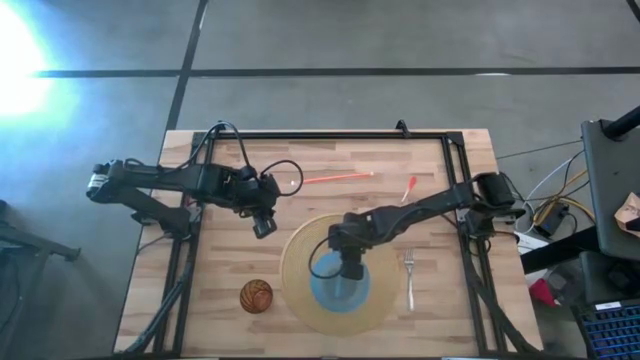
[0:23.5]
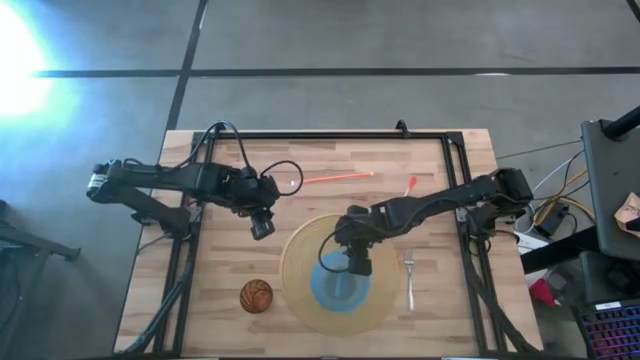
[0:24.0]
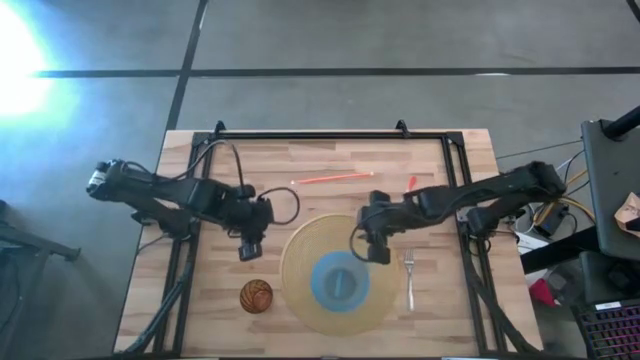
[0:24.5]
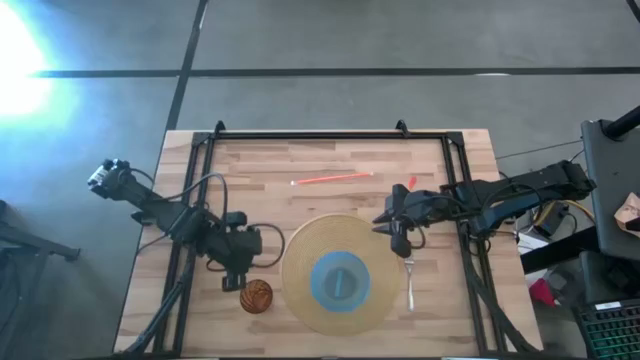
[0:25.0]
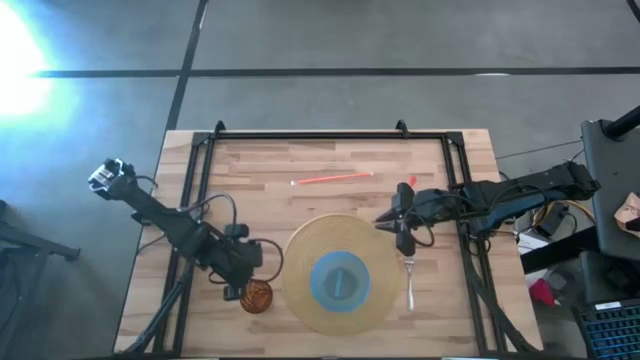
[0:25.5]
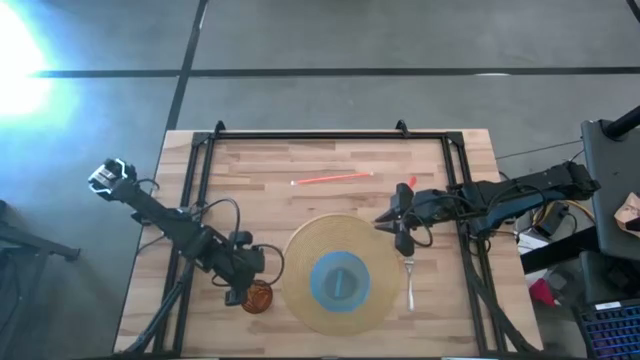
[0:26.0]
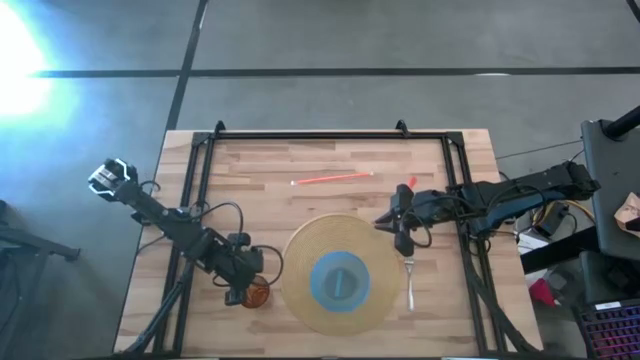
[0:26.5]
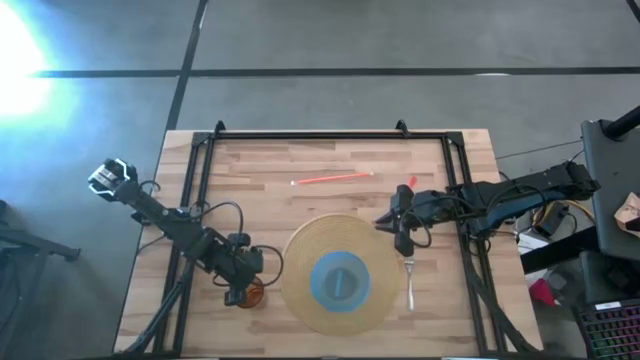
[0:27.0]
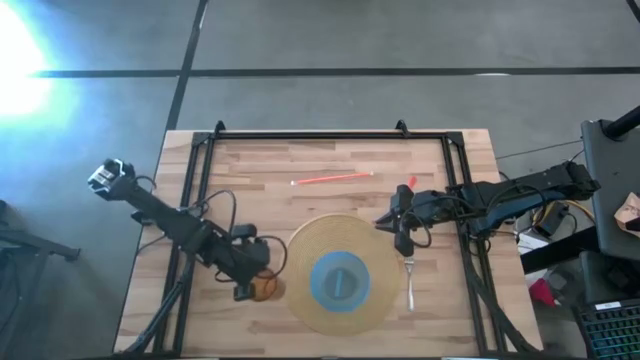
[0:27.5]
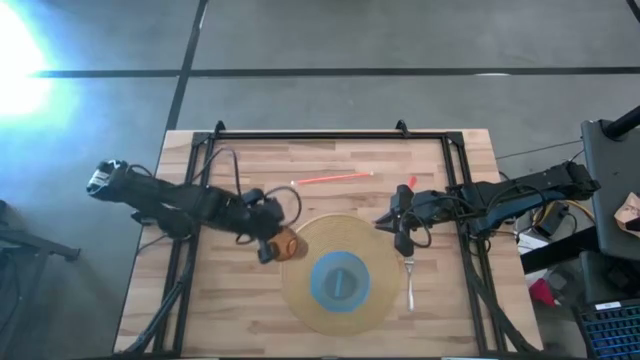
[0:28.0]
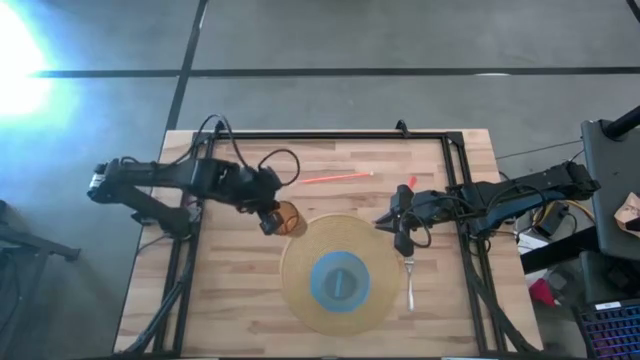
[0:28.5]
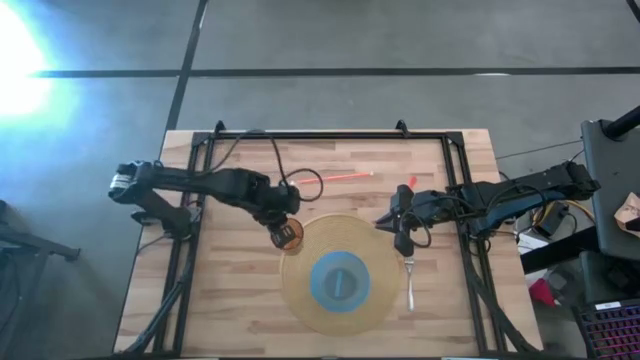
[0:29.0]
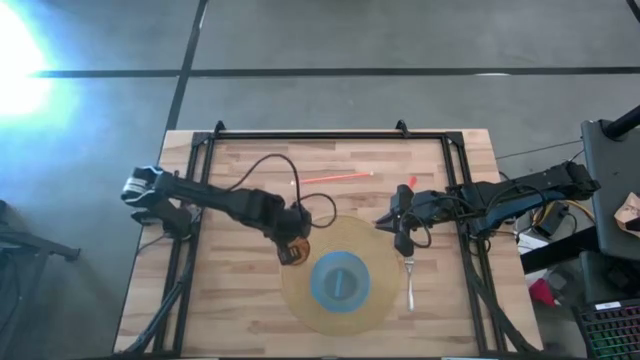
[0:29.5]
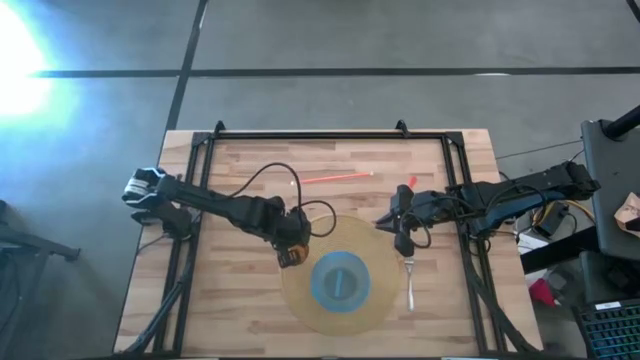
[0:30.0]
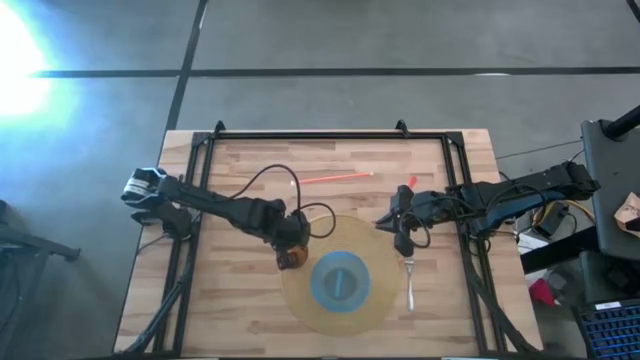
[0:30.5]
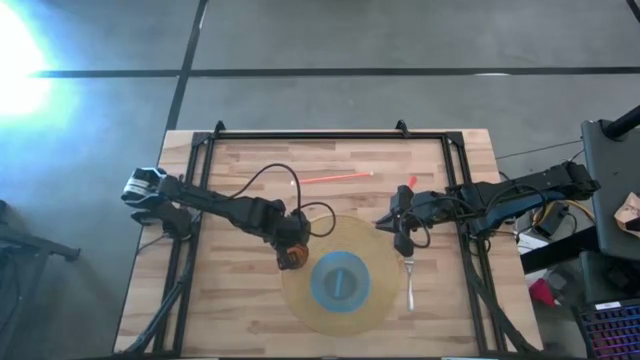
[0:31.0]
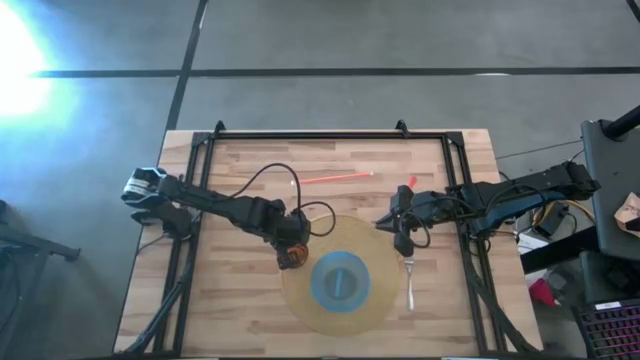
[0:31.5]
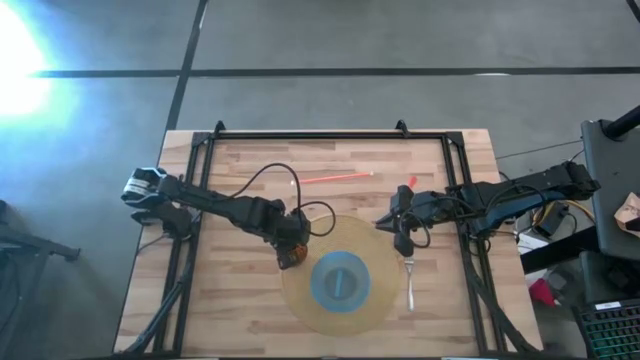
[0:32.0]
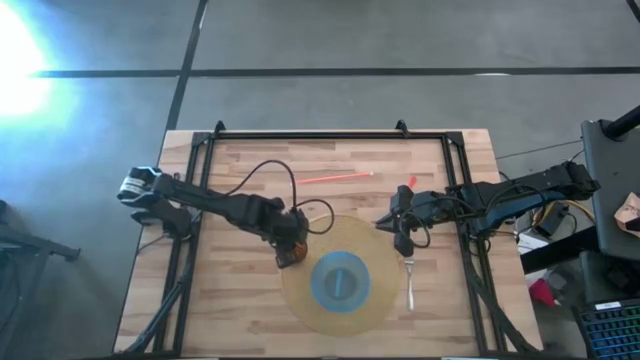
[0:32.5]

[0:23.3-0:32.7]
Task: Pick & Place Utensil
Put the cup on the mat

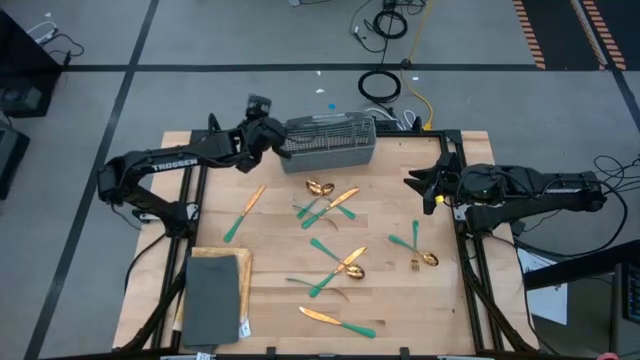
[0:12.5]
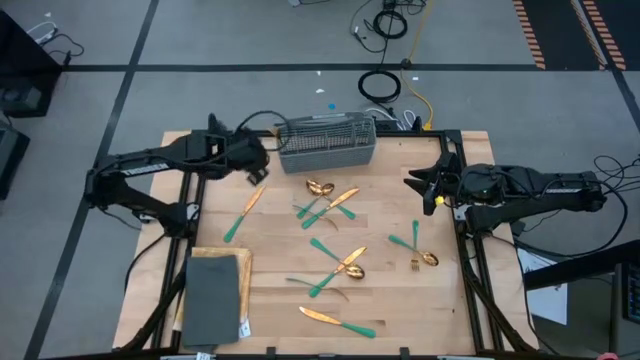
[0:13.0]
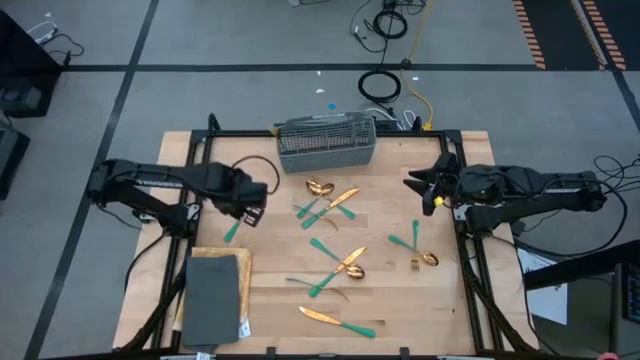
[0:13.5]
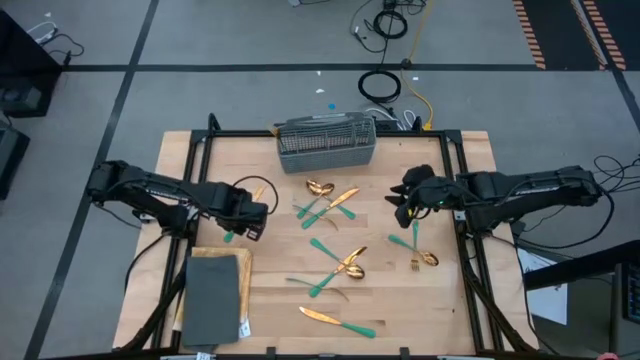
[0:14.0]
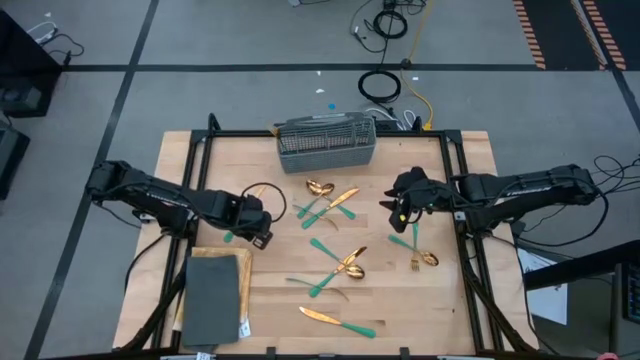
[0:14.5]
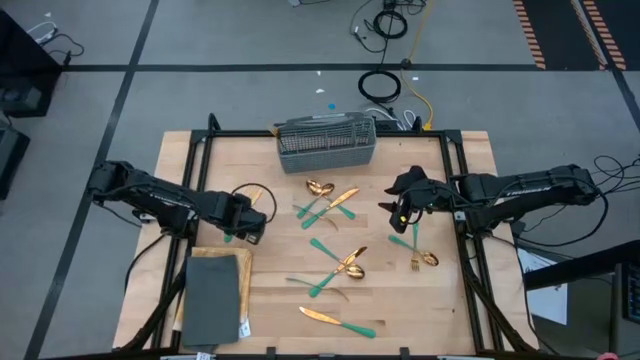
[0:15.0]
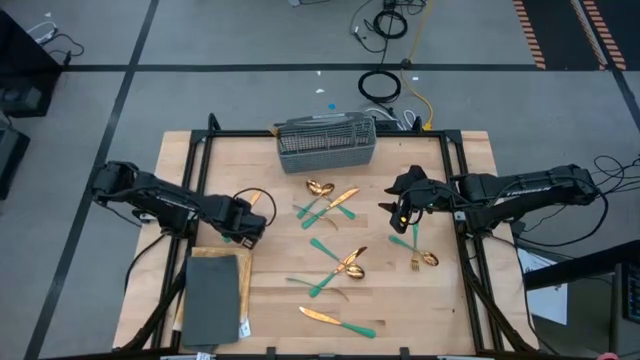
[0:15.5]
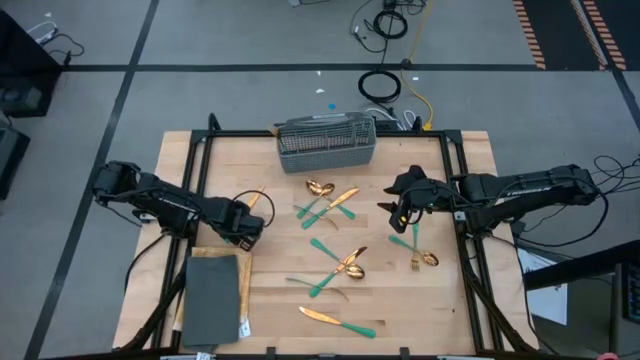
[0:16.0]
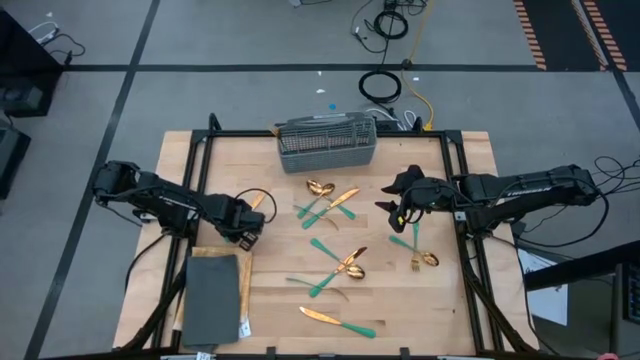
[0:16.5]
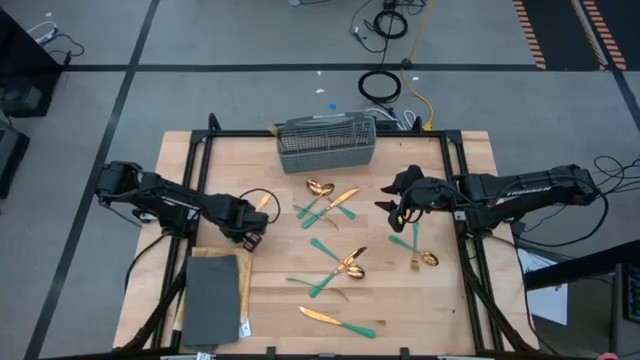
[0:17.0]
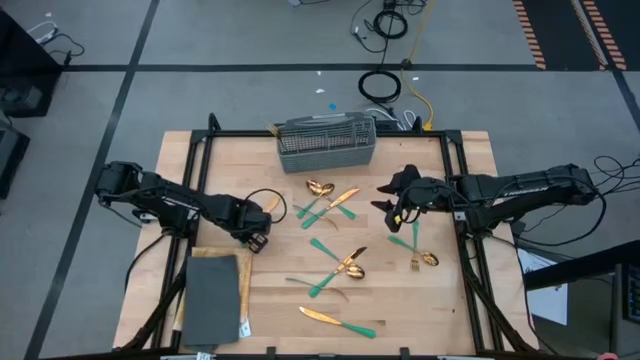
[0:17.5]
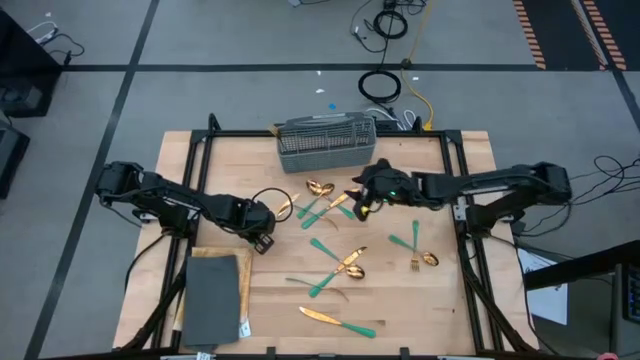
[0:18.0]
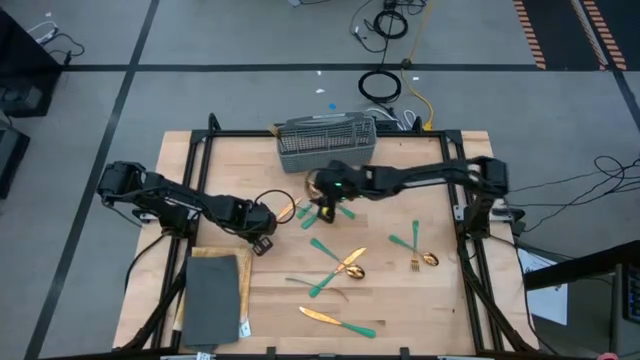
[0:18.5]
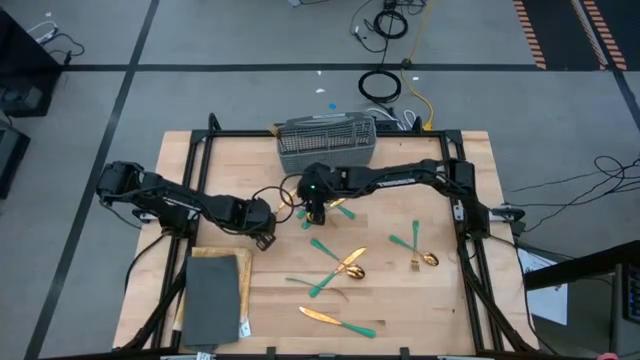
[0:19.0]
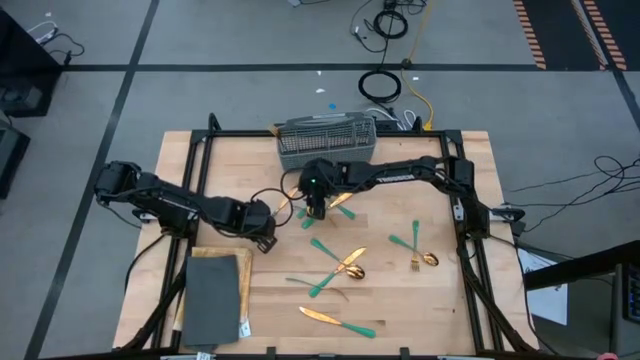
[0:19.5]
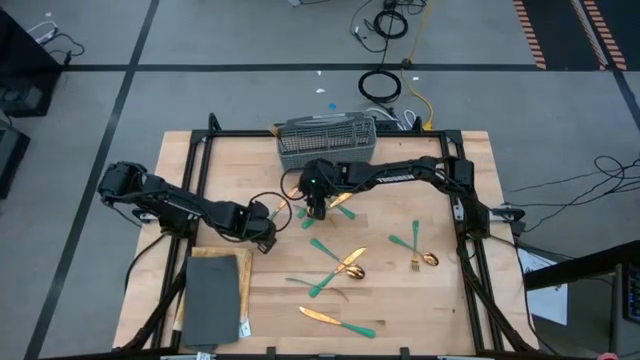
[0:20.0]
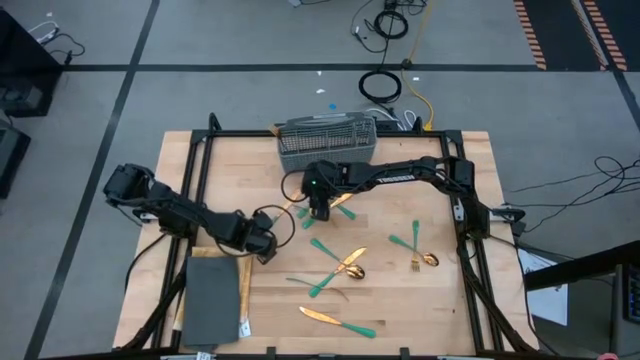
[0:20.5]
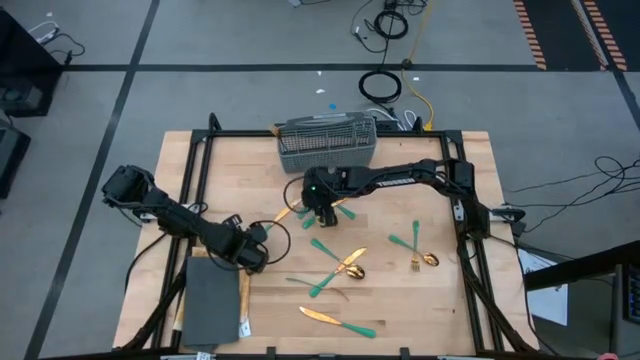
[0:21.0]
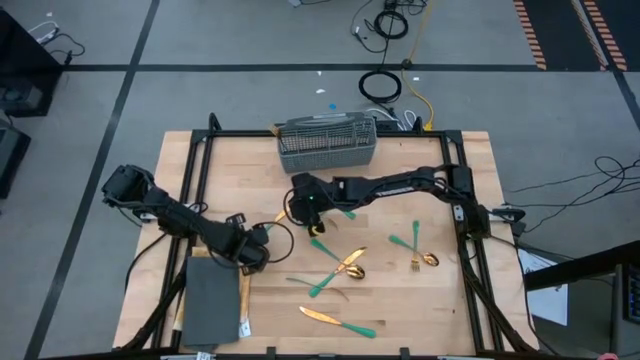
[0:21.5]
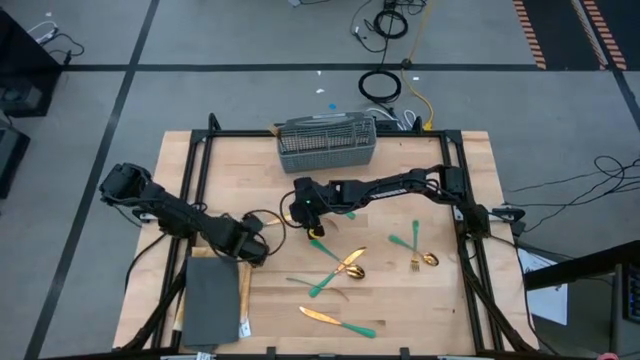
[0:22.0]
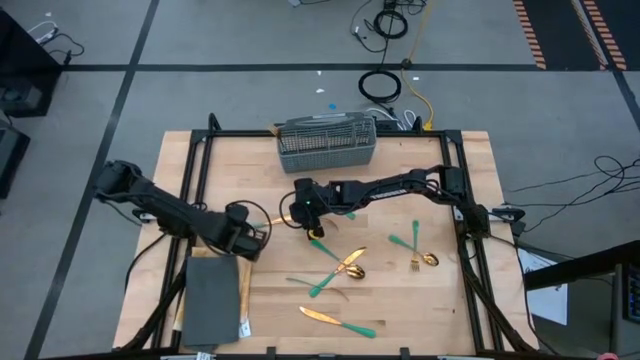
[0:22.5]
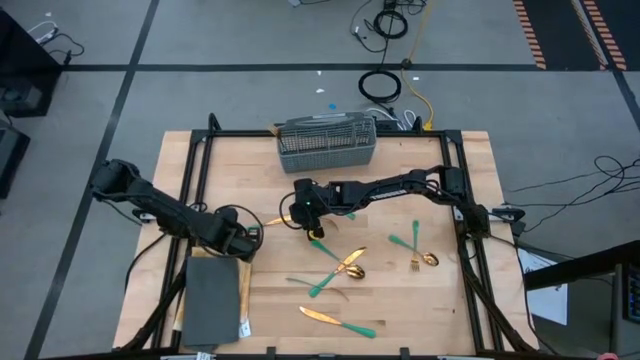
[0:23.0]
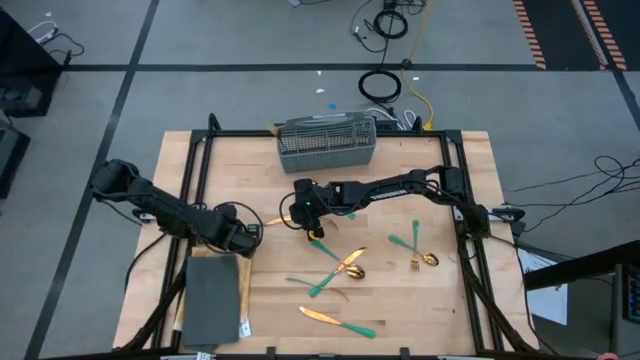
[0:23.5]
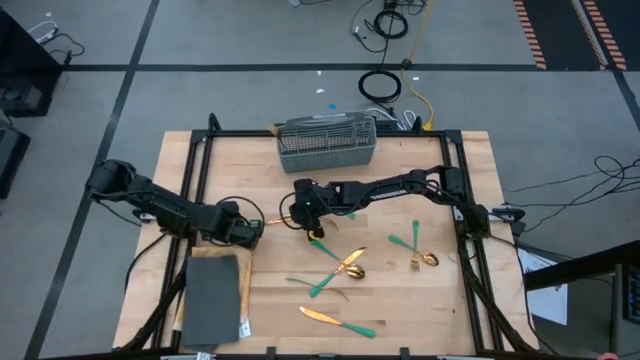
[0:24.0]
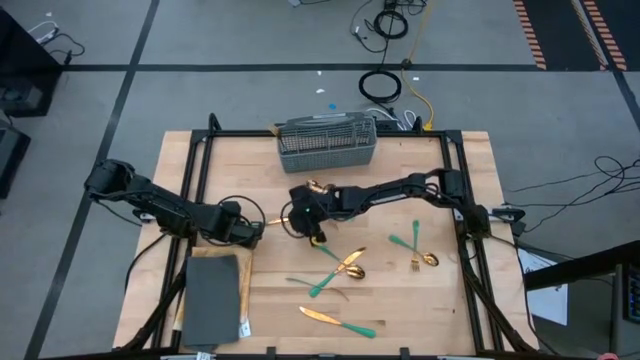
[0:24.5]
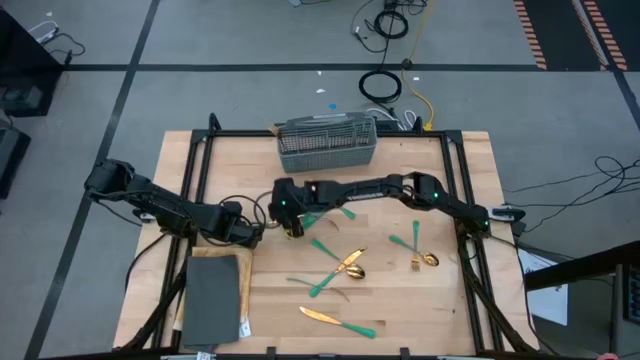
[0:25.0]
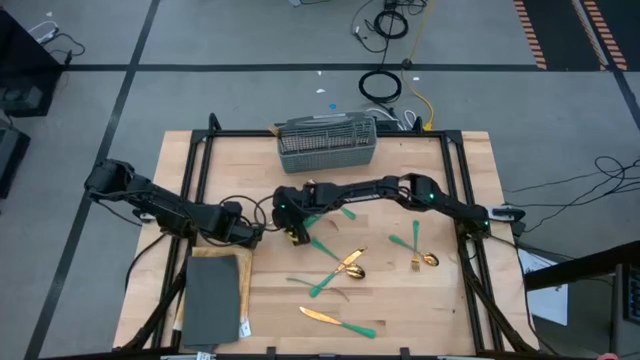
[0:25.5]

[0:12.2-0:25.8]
Task: Sort silverware
Put the green knife into the silverware basket
